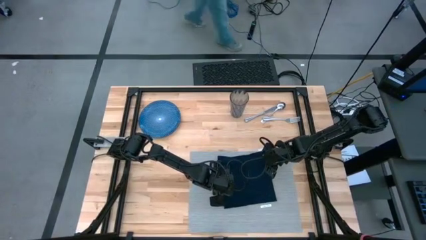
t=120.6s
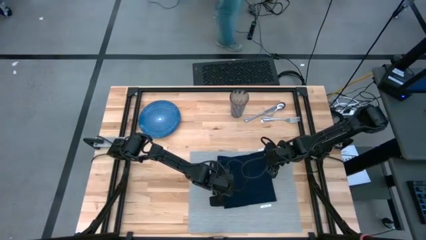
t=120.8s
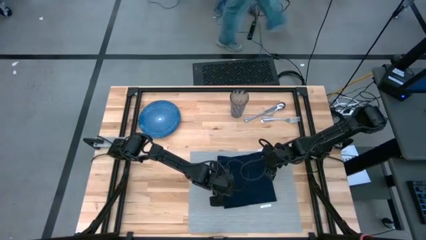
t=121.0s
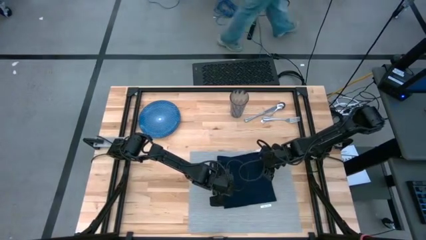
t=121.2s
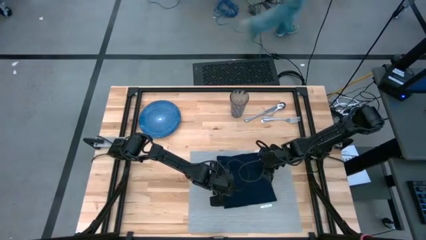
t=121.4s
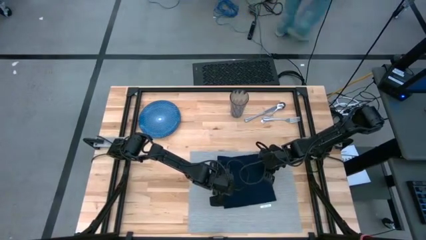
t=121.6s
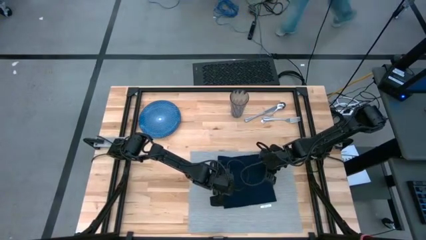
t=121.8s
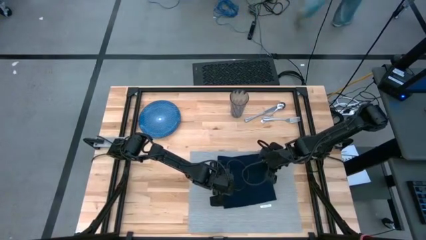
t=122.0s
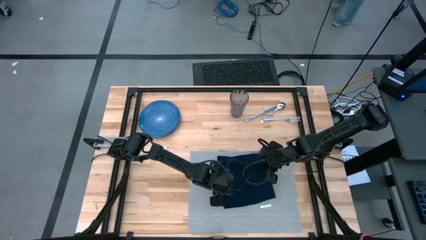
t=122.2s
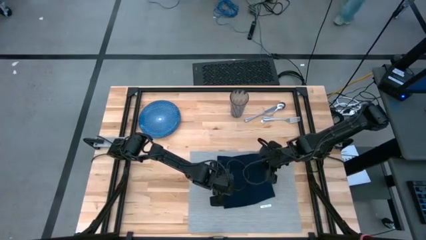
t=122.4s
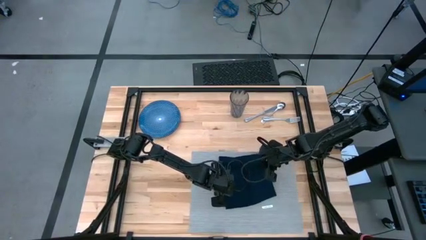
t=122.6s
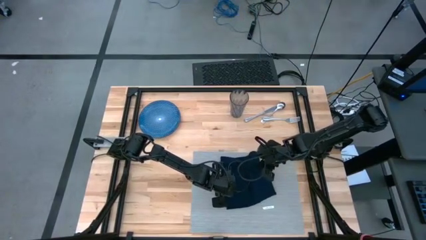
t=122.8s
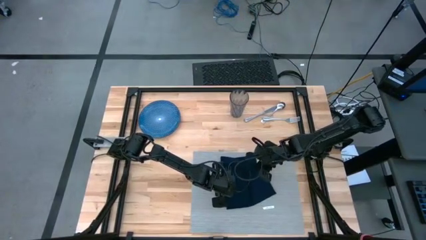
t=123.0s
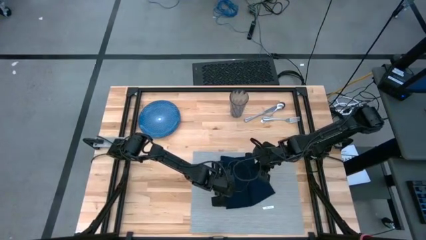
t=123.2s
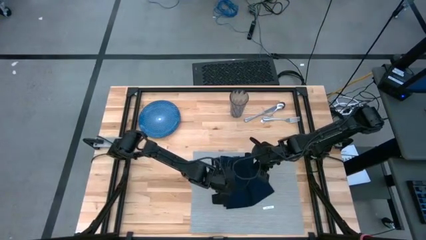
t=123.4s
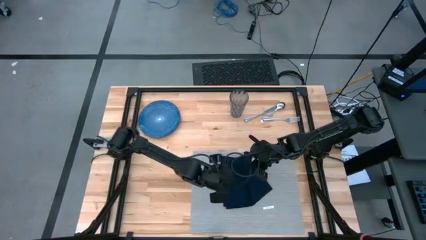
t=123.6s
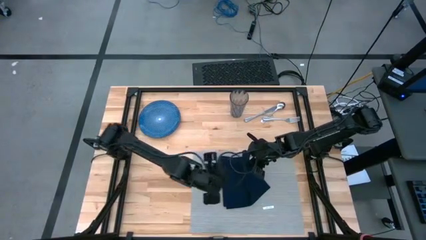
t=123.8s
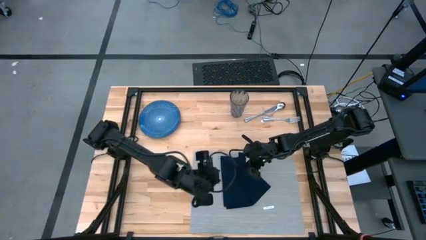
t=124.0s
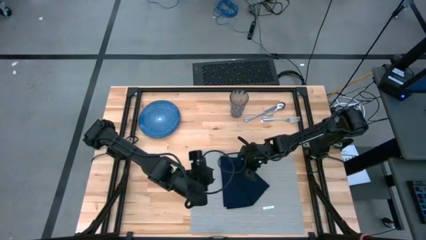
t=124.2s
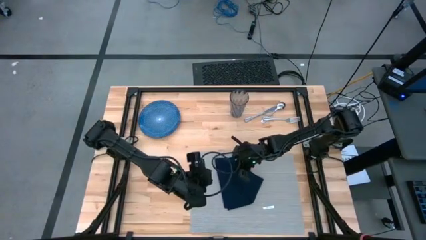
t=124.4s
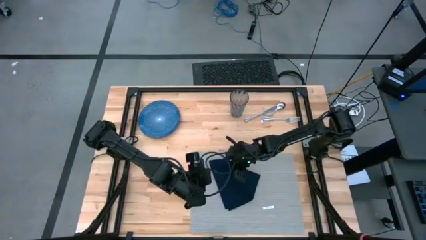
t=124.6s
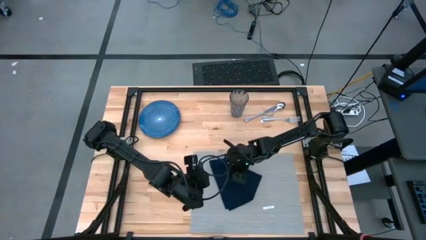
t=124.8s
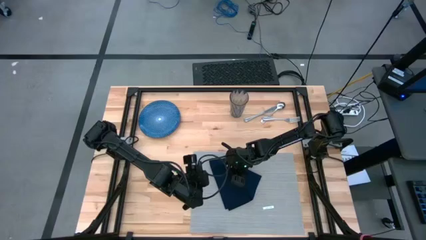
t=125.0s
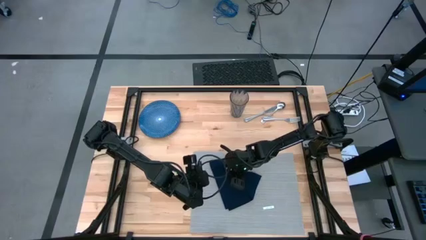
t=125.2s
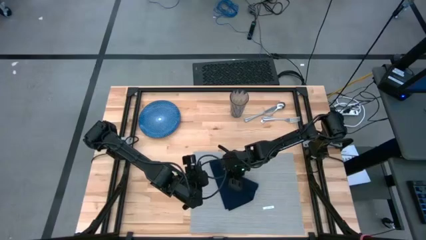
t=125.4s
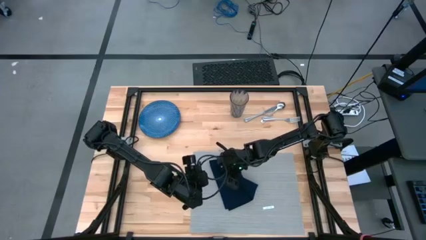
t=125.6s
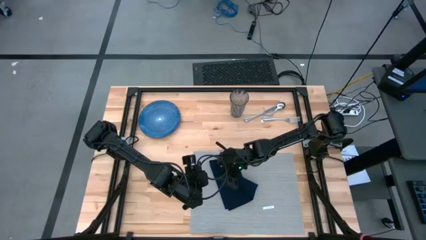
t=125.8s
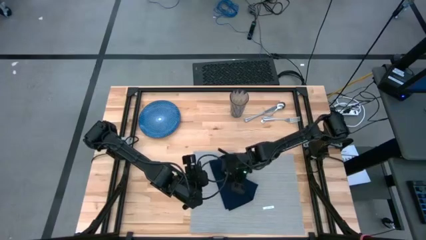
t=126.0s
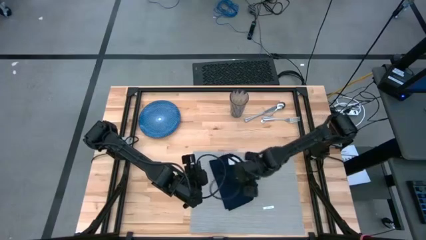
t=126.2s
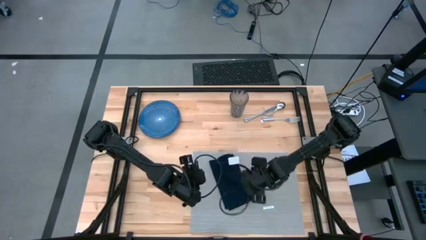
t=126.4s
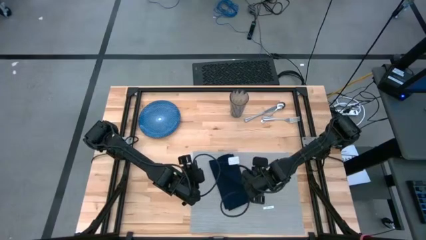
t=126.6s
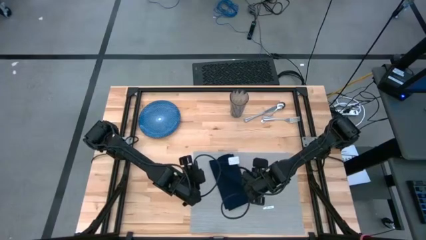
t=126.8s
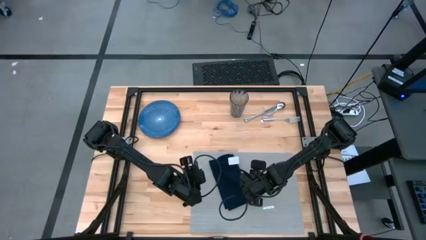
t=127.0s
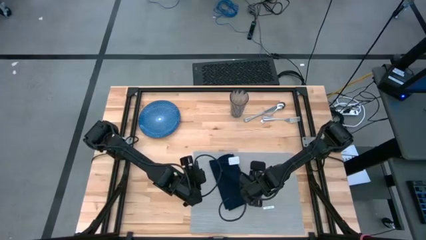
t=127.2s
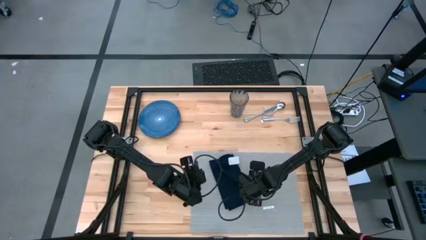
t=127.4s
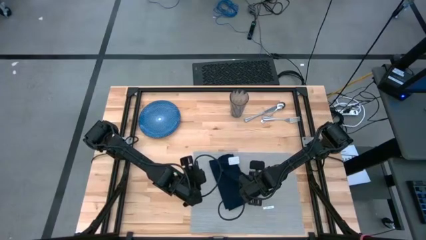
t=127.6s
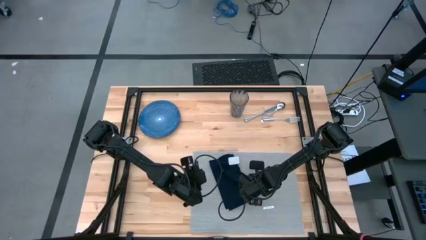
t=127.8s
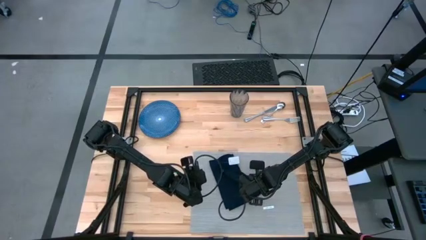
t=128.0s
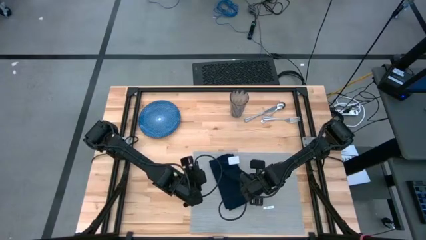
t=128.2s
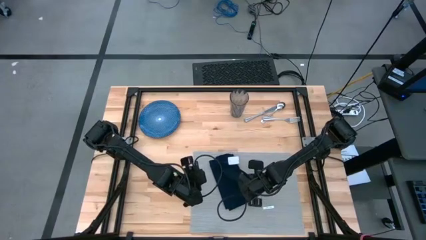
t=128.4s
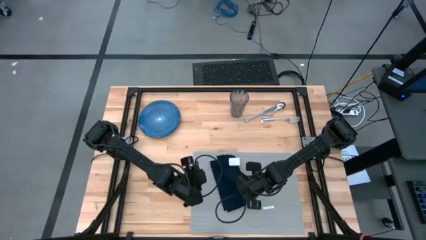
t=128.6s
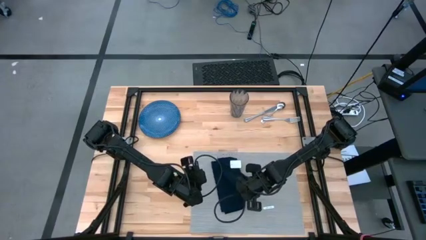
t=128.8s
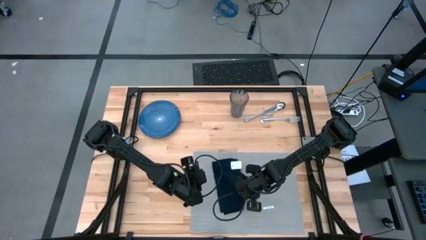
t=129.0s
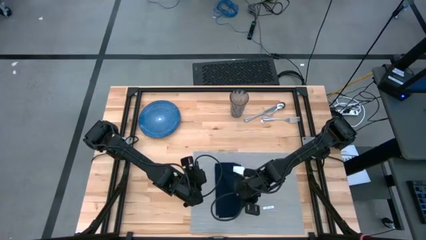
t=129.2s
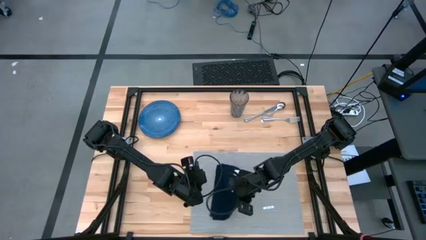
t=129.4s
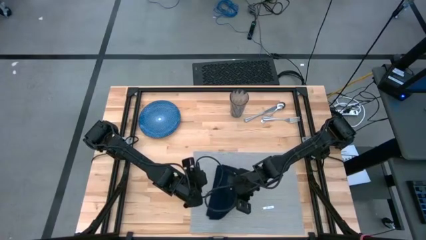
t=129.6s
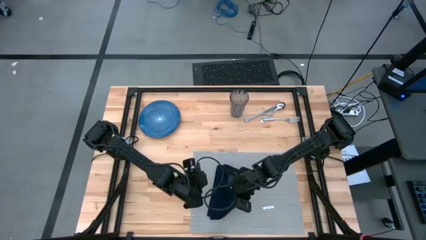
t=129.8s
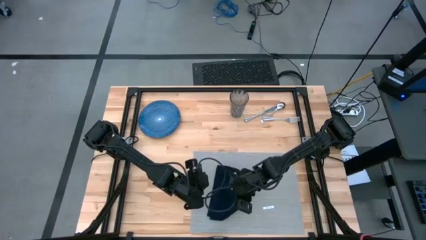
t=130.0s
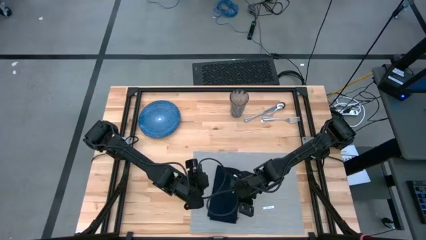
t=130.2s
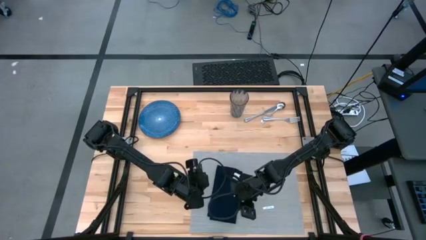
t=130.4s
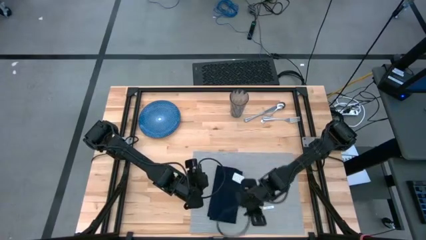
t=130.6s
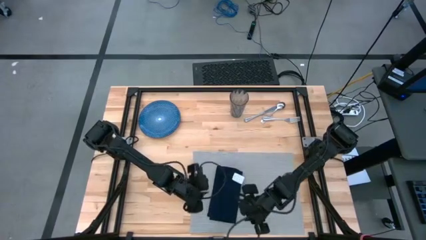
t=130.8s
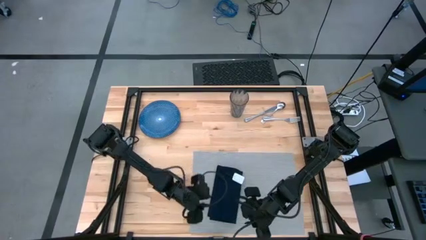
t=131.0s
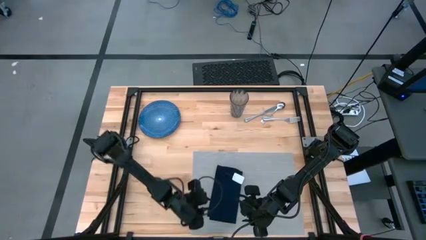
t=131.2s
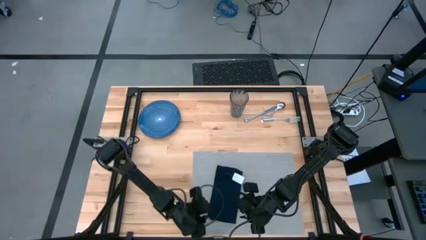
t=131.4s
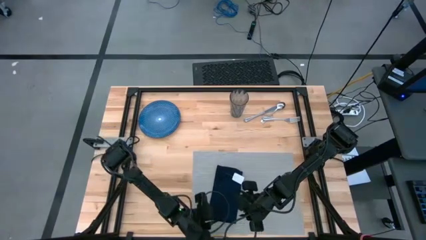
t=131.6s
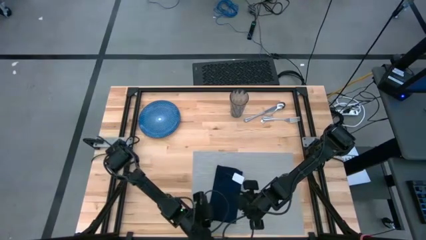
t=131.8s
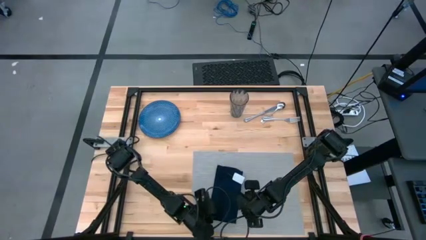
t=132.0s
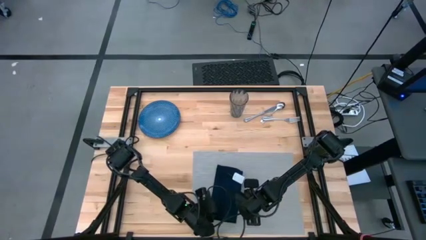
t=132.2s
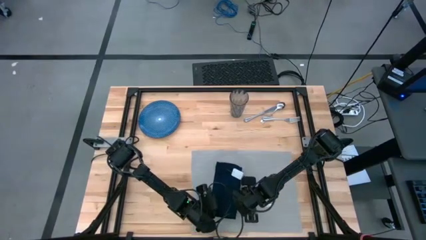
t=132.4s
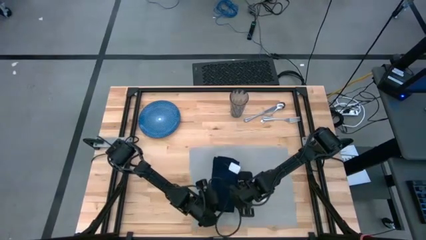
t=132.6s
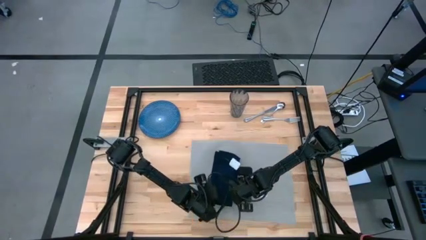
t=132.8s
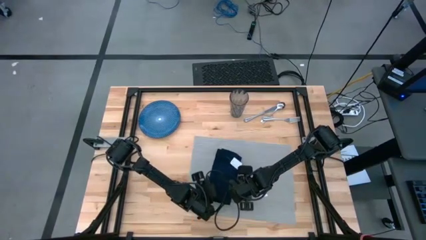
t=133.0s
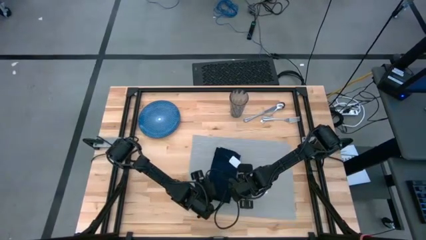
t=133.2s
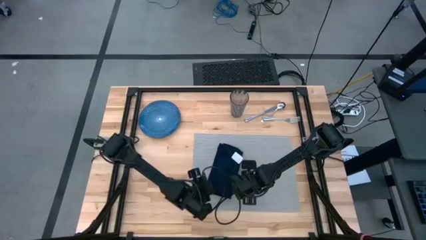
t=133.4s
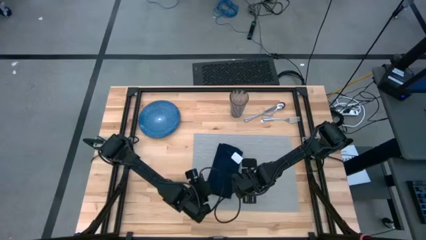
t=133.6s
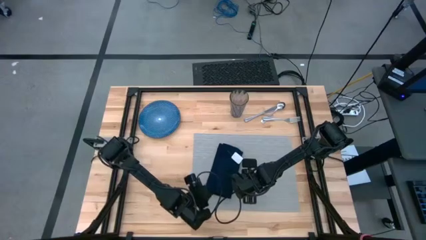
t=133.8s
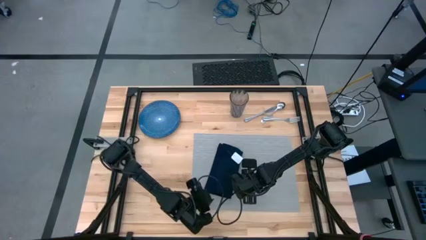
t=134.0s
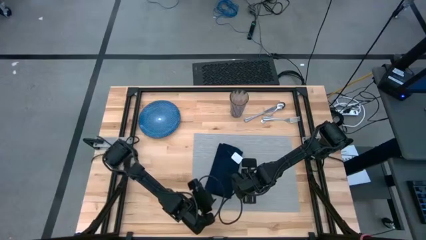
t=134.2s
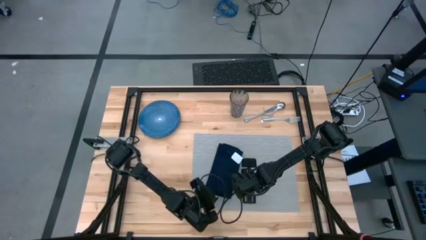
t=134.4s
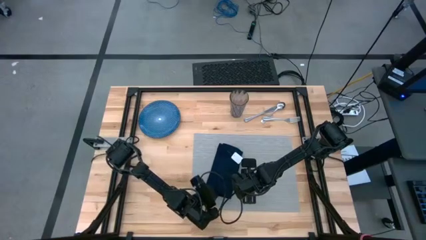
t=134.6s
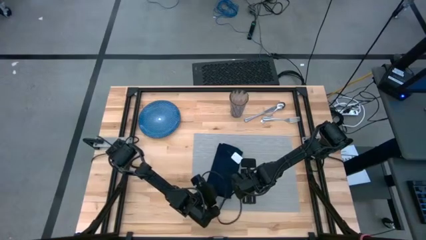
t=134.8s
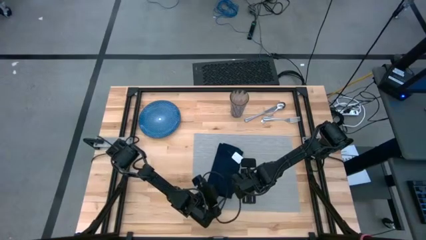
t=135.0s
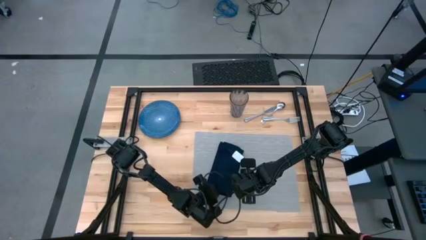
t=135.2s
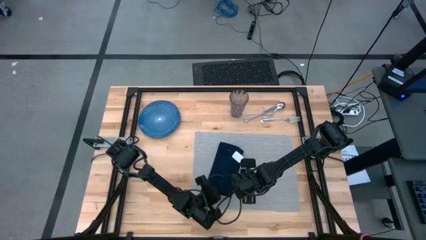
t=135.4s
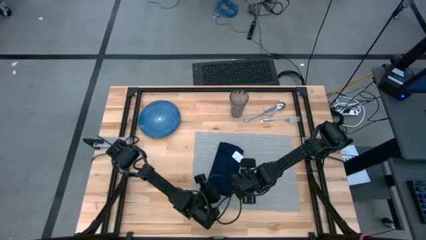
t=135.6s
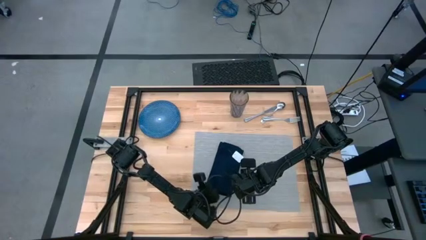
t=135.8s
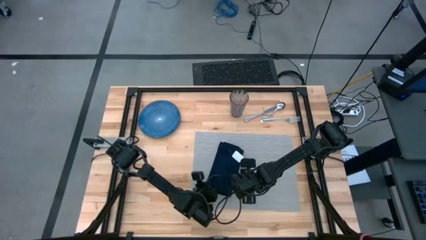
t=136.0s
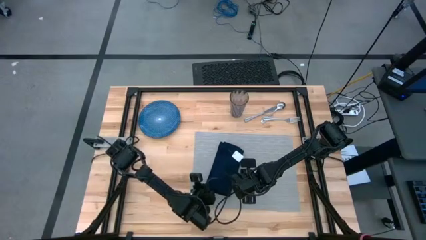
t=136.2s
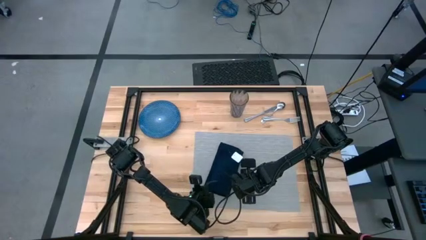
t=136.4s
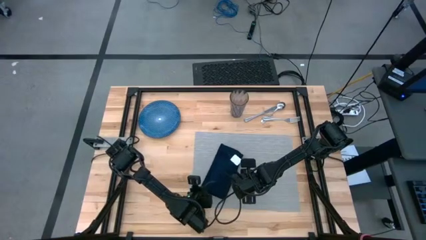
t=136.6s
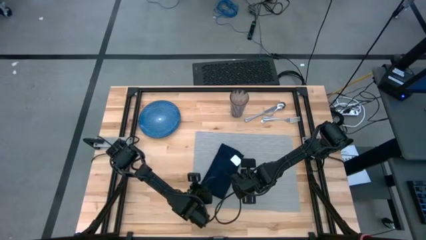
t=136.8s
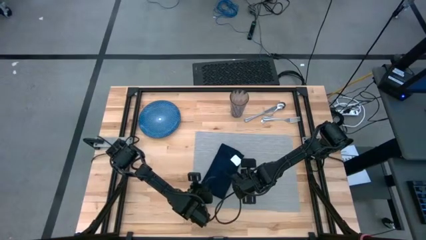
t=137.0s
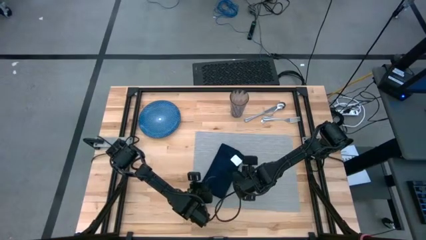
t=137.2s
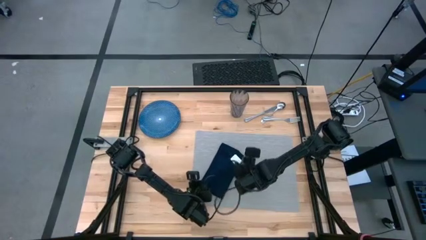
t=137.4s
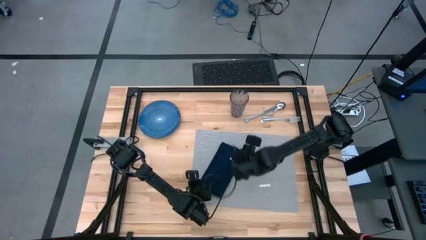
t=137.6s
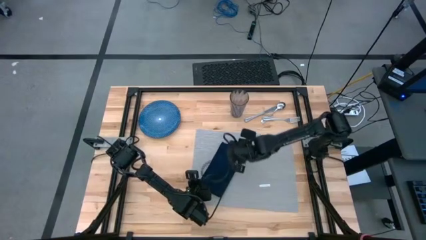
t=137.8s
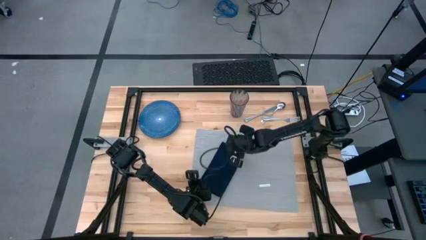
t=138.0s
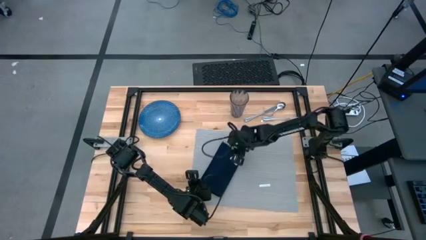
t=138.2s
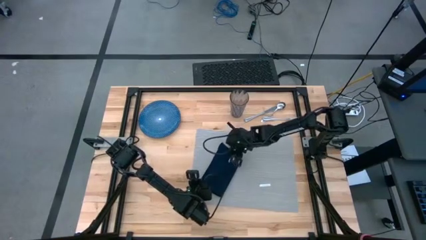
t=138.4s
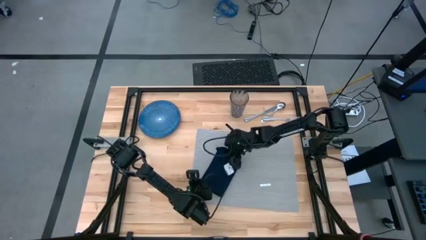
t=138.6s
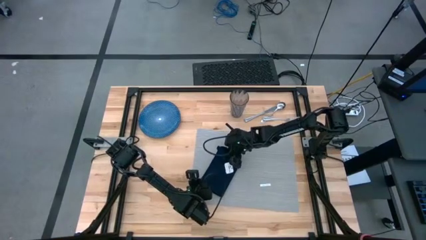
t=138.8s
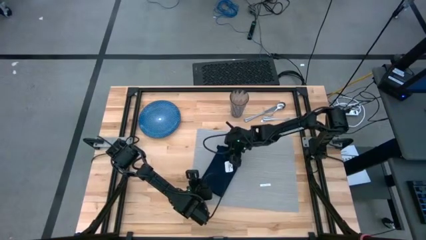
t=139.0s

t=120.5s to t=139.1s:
Task: Set table place
Fold the blue napkin
